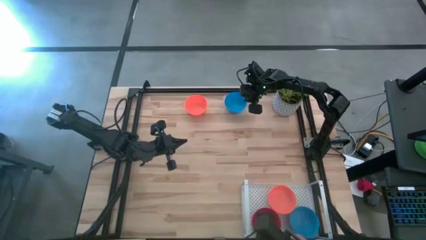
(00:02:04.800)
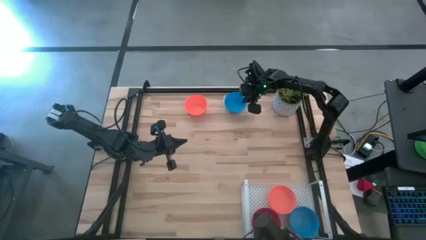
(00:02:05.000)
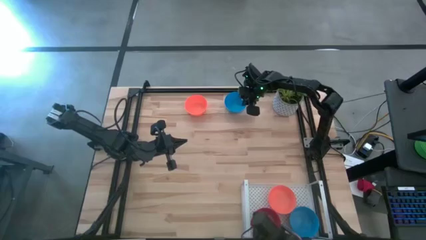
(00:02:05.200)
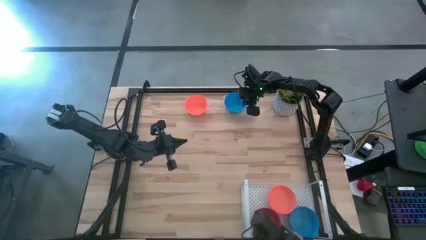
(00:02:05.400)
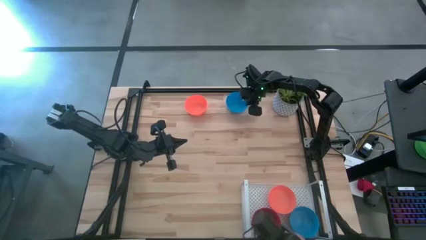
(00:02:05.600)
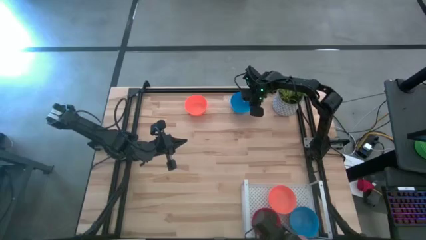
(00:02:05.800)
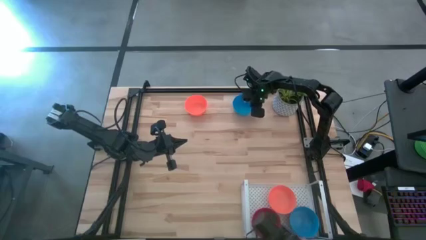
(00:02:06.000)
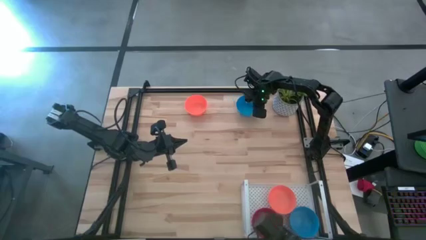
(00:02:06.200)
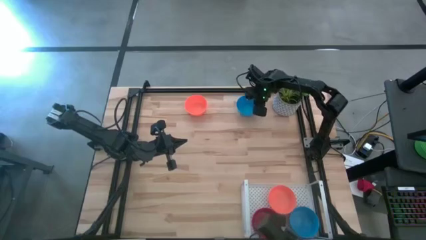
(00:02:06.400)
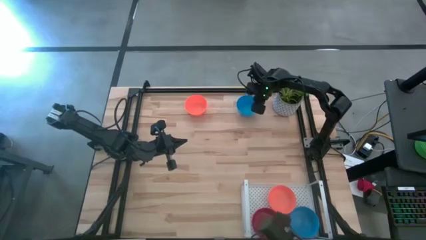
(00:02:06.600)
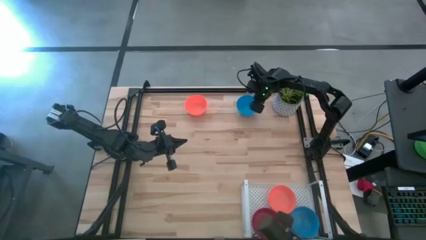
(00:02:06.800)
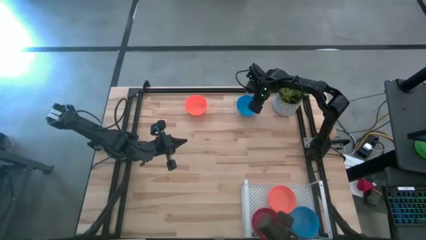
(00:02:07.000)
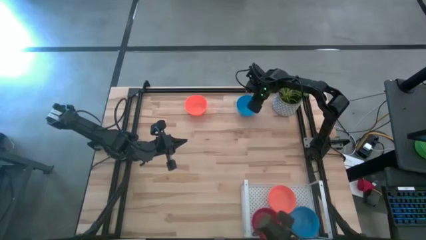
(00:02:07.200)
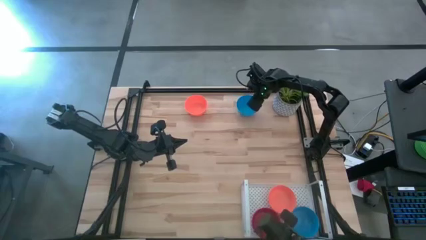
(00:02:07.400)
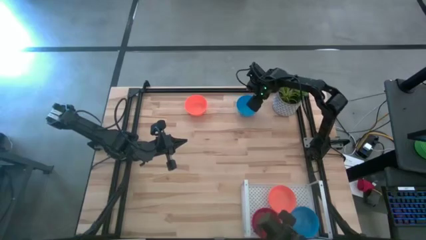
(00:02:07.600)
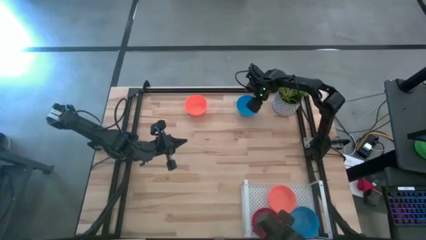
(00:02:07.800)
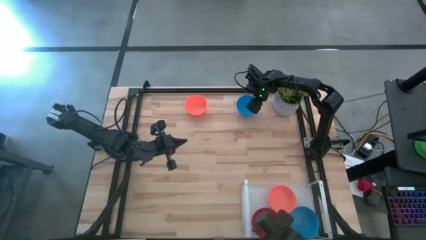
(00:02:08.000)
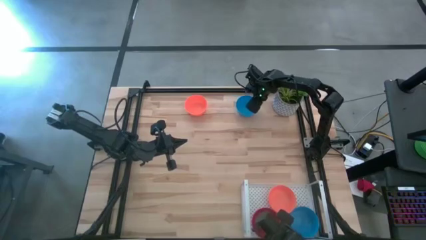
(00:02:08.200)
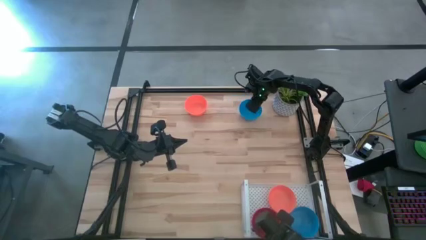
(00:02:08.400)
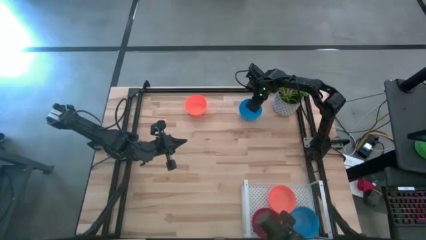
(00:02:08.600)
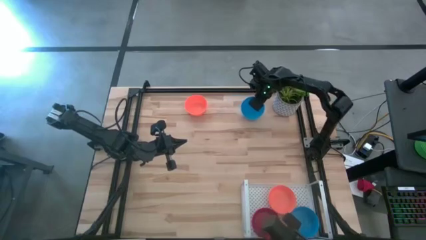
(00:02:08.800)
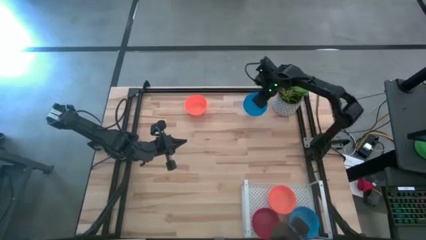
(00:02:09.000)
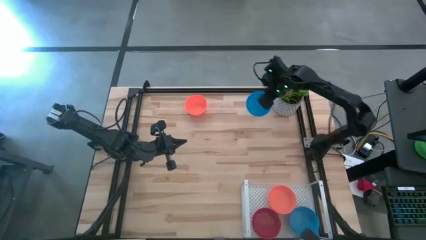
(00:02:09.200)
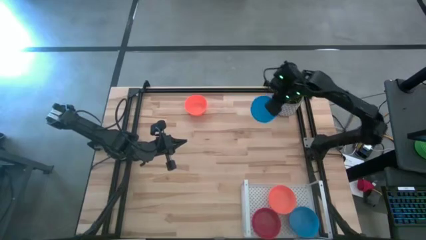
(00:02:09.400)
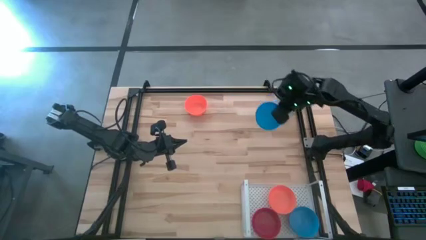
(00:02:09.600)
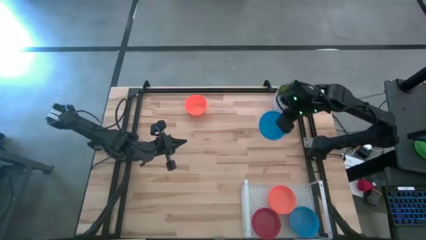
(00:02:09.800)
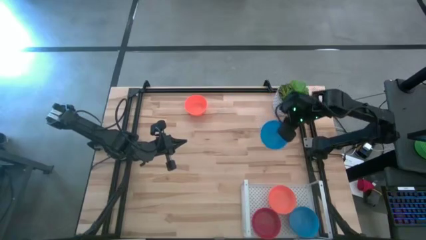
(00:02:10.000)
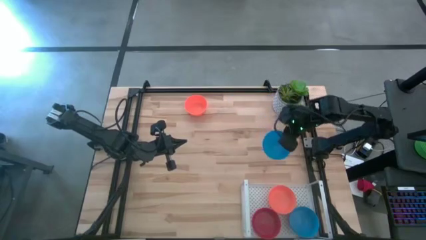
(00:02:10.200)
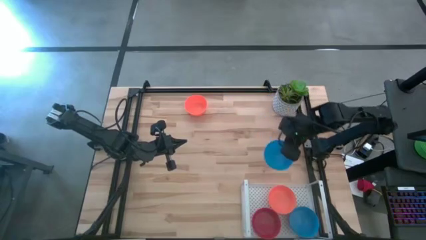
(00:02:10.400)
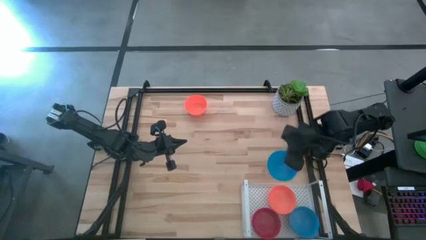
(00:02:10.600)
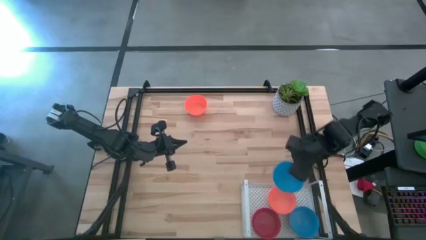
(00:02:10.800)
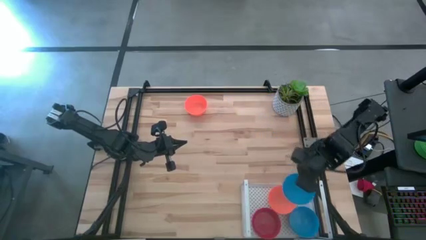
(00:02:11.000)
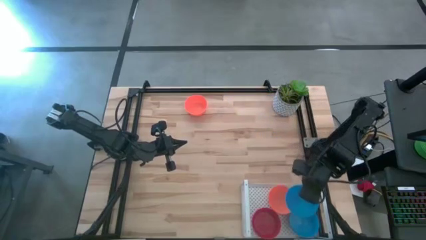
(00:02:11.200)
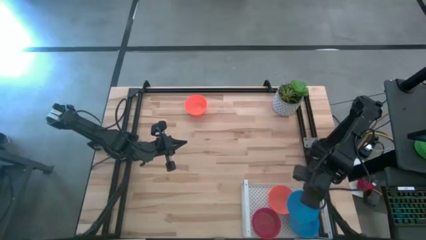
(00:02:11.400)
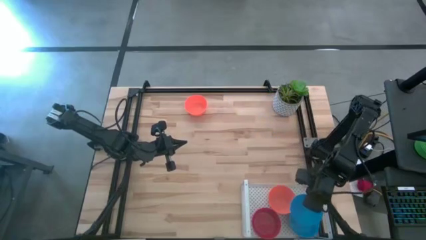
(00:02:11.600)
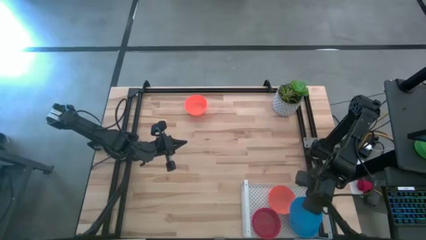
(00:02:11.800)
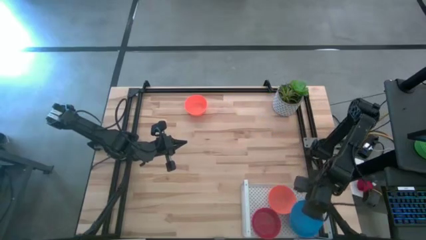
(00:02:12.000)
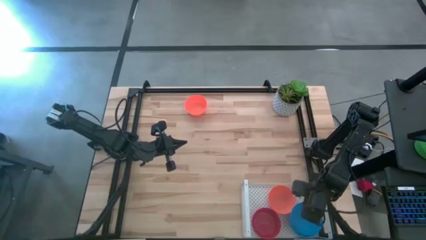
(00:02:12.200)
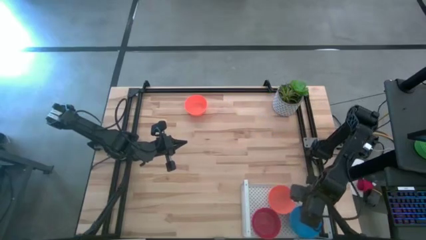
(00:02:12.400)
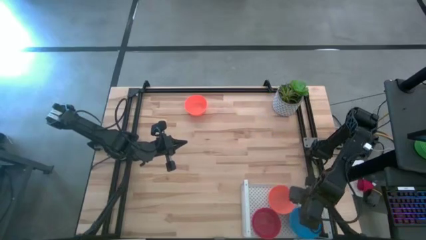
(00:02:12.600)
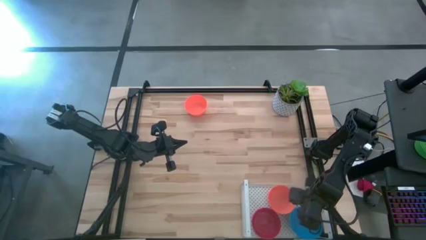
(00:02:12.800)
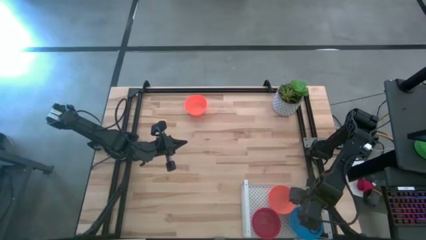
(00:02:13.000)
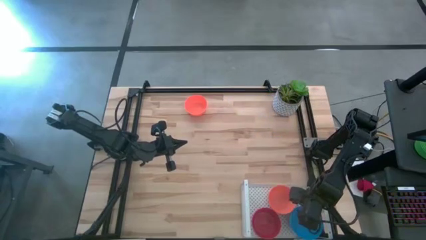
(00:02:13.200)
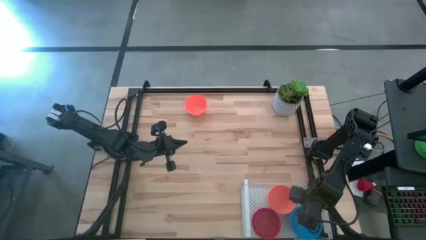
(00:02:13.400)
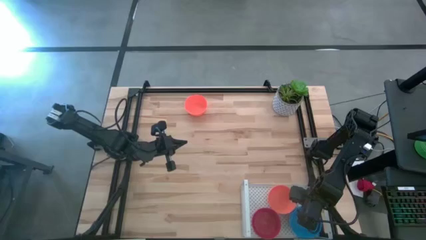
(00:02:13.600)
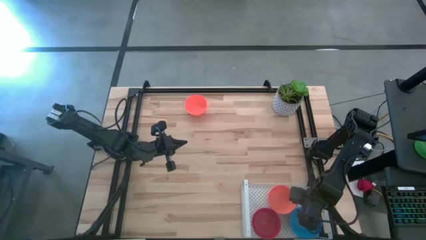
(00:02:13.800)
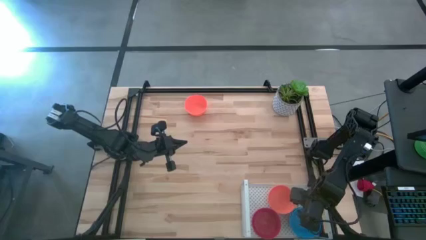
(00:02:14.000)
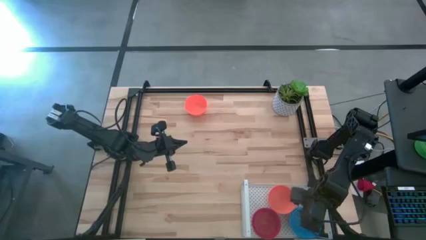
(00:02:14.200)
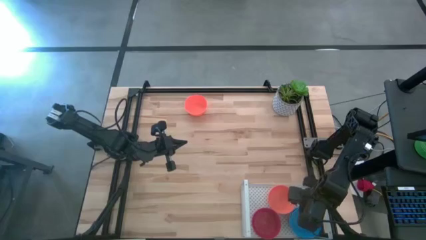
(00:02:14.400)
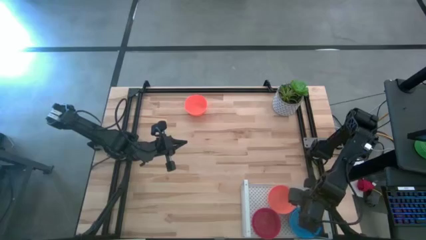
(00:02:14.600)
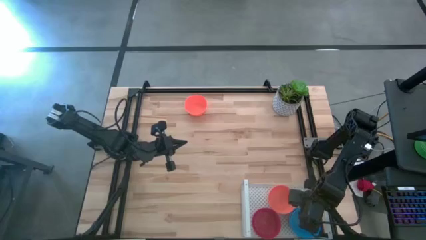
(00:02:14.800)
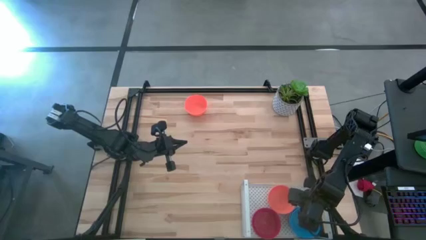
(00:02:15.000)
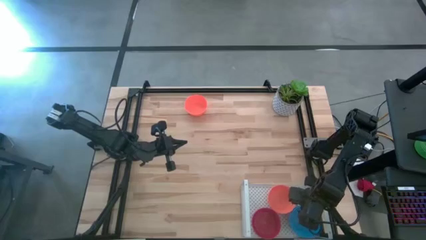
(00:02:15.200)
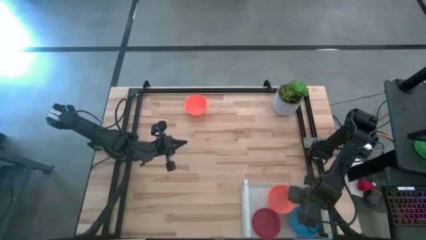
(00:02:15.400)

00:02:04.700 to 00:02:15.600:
Task: Pick & Place Mini bowls
Stack the blue bowl on top of the blue bowl on the shelf

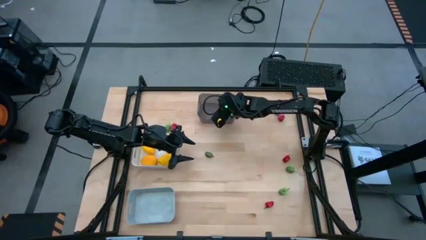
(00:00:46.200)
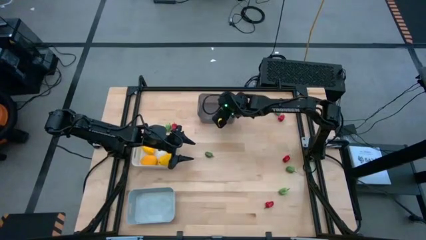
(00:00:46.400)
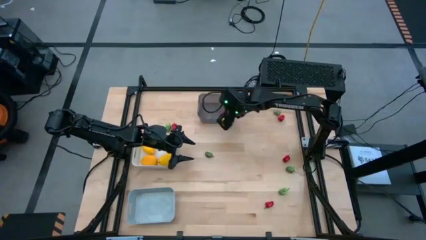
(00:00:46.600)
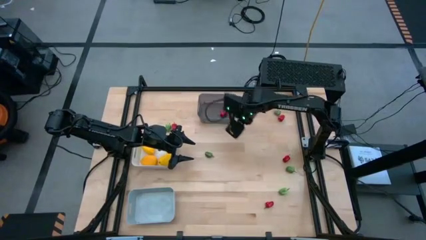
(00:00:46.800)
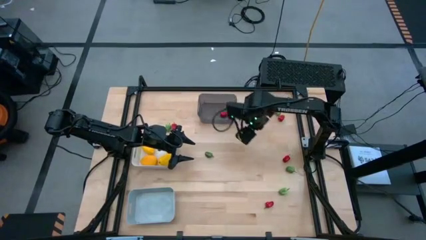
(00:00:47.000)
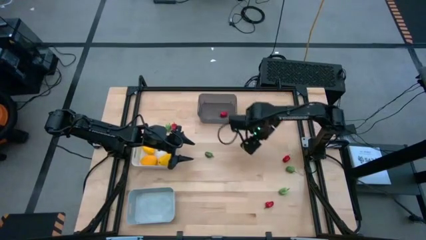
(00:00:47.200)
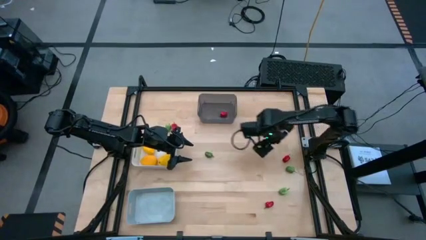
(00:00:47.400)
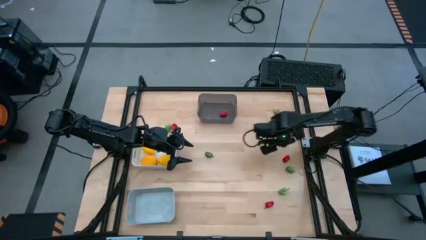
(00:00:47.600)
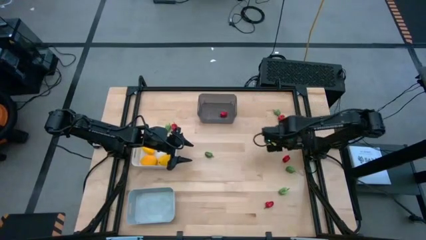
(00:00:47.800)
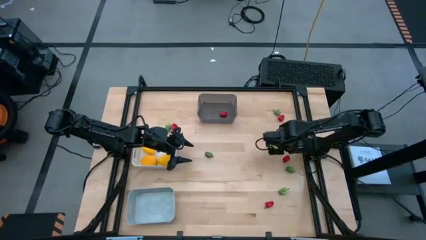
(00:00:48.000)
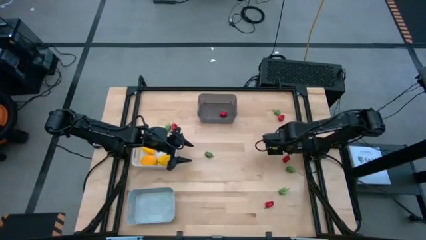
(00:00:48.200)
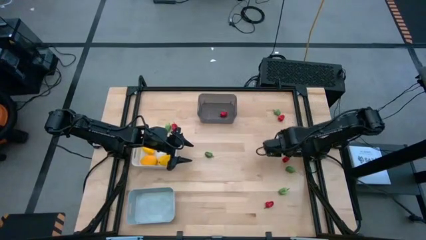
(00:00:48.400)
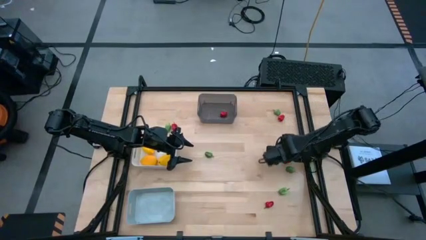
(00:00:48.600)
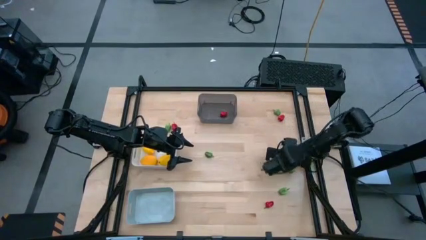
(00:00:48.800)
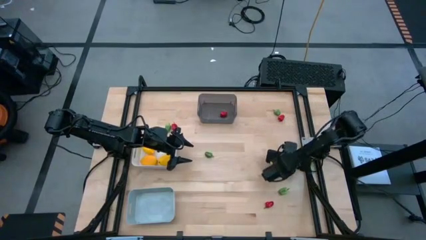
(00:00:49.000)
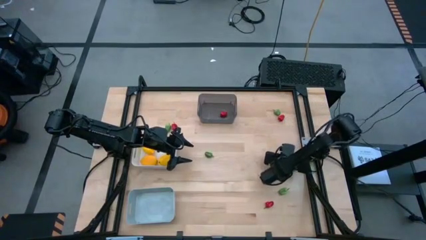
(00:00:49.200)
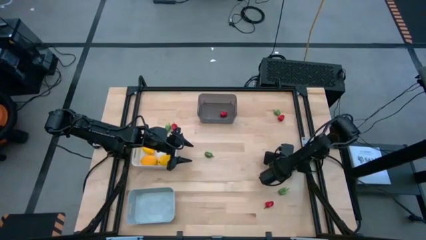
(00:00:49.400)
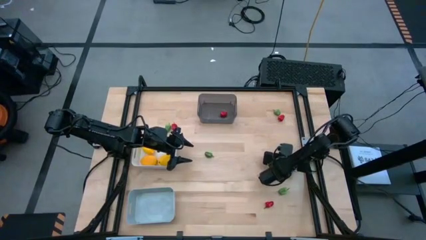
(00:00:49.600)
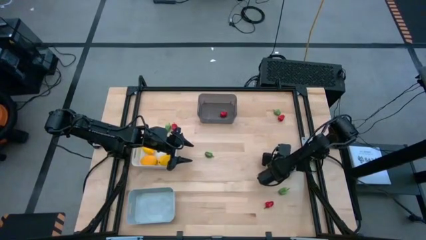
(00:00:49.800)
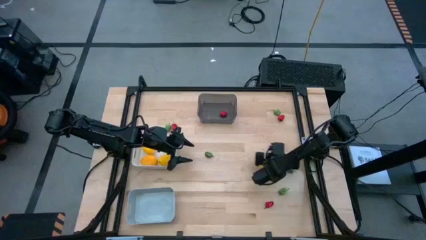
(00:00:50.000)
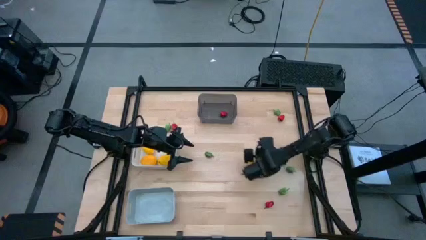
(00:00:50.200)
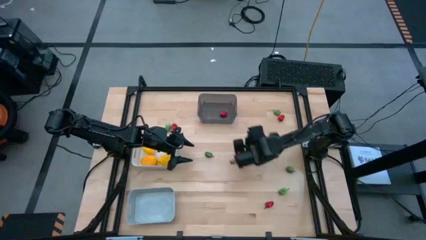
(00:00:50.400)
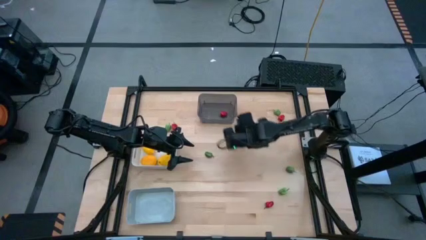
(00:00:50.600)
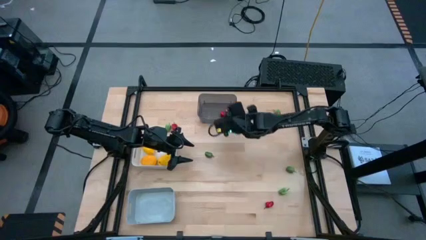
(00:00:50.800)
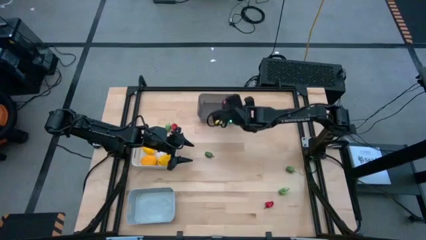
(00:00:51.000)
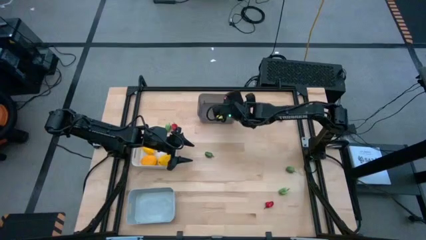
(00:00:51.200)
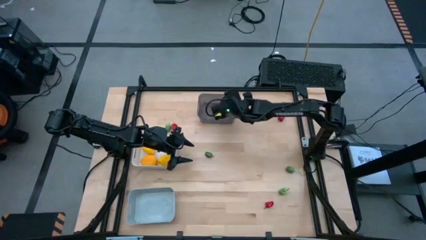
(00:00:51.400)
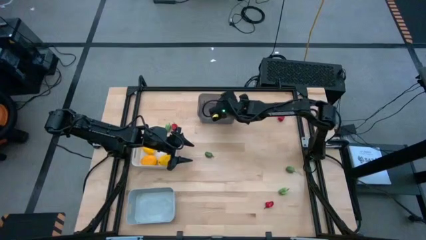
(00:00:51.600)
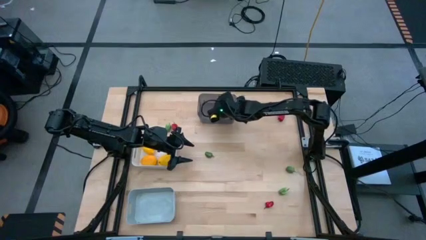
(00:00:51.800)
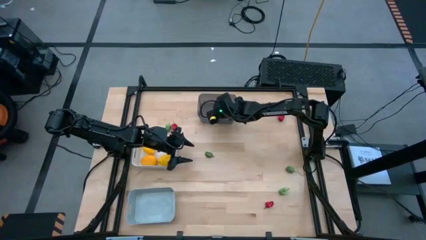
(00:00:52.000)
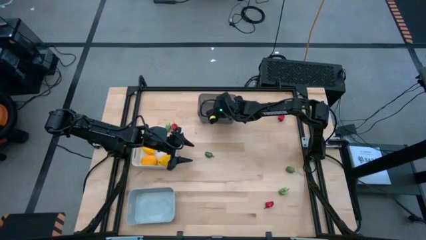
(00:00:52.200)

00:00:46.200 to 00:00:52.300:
Task: Sort produce into baskets
Put the red chili pepper into the black transparent bin
